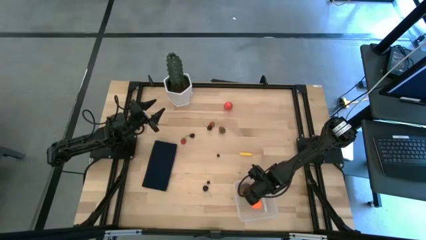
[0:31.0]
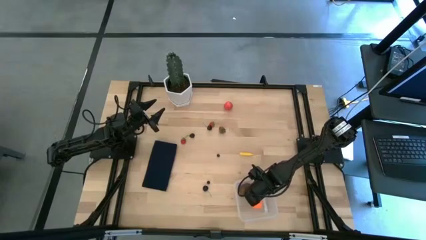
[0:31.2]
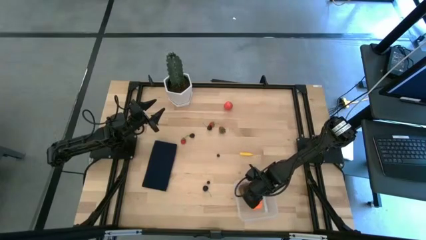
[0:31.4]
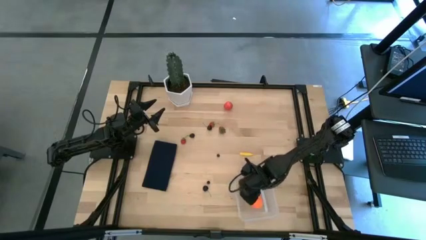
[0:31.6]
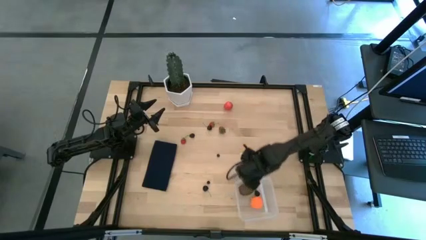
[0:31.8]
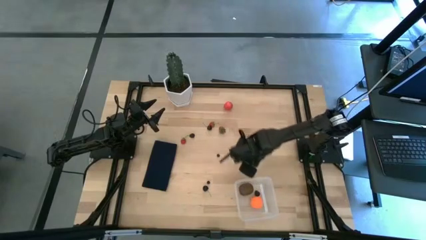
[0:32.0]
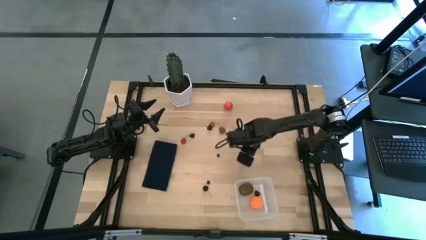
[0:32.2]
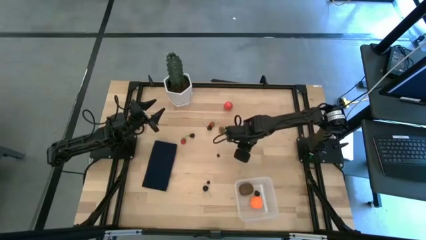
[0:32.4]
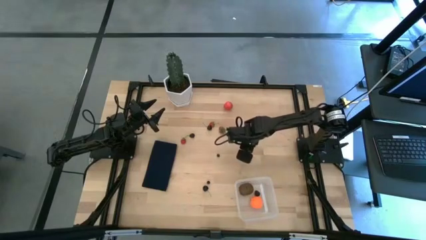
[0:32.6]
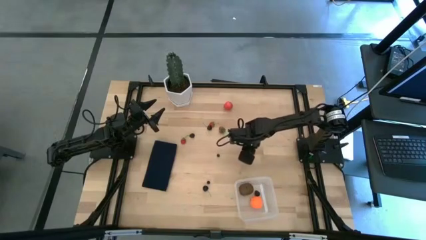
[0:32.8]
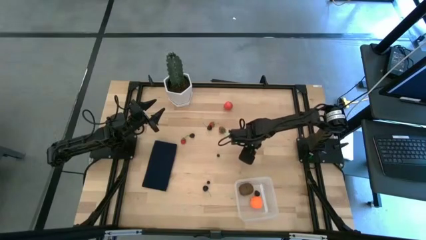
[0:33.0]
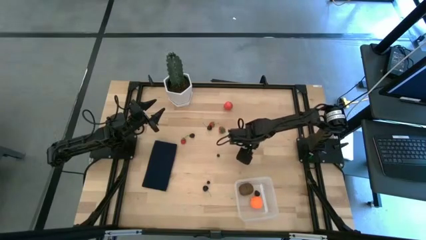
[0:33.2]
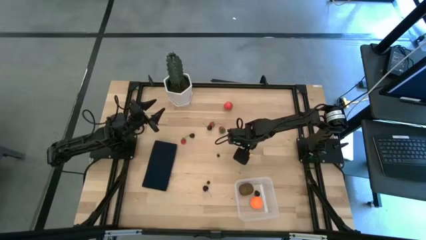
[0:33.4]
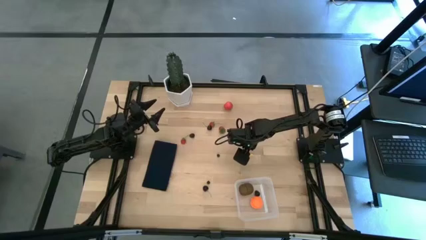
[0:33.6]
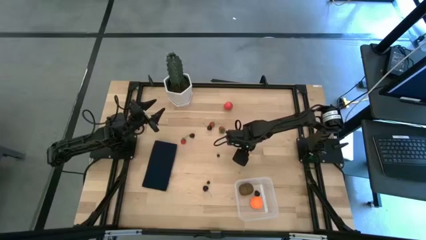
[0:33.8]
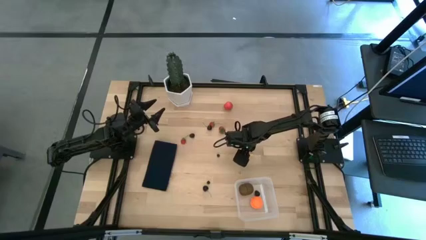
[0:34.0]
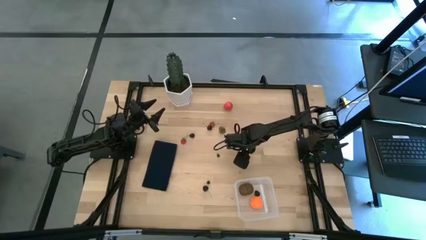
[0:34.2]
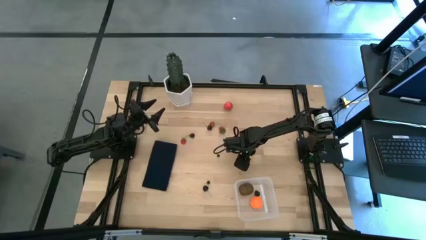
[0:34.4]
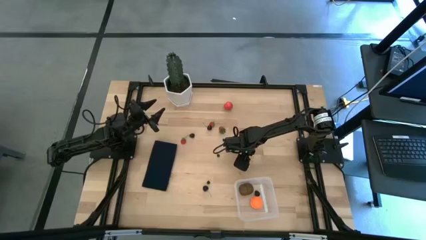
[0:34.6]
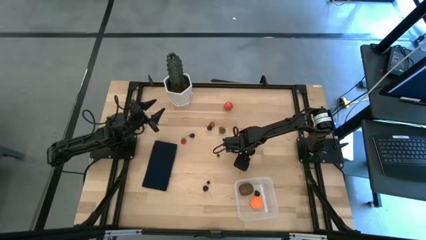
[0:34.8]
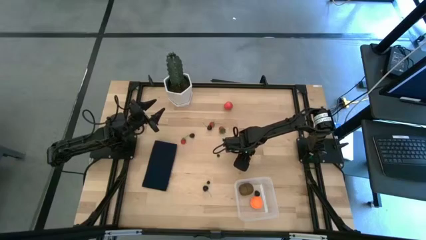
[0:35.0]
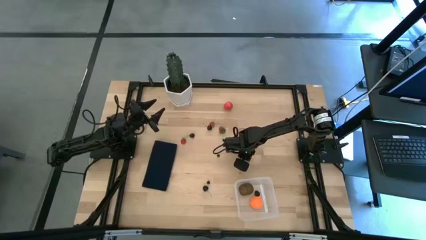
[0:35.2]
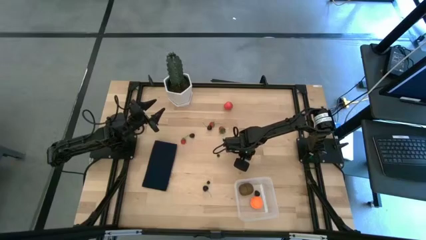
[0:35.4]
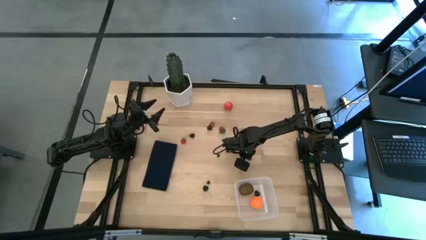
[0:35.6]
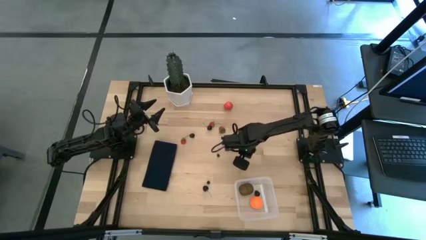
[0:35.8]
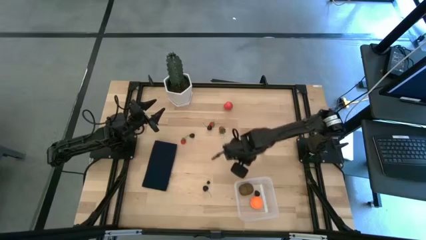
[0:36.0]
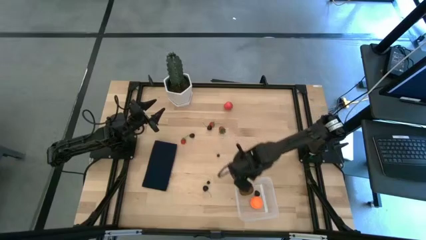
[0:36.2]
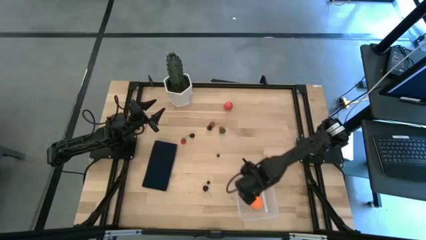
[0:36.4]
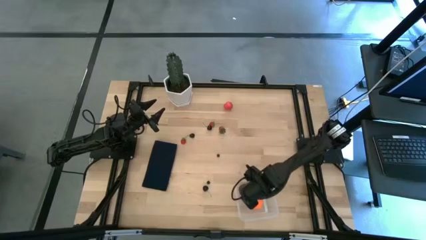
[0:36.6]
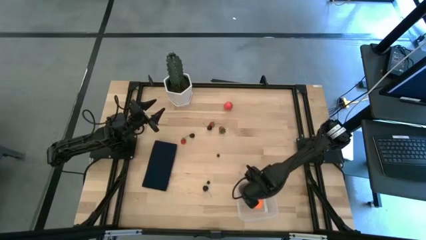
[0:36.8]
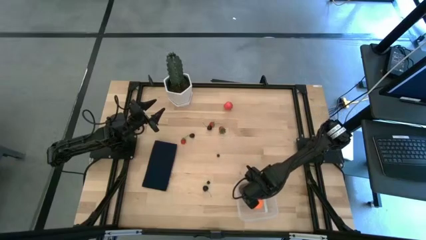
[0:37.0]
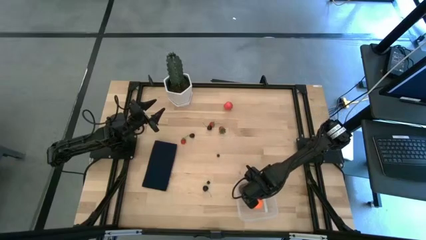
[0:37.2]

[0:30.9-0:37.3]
Task: Pick and placing Produce into tupperware
Put the corn into the transparent bin

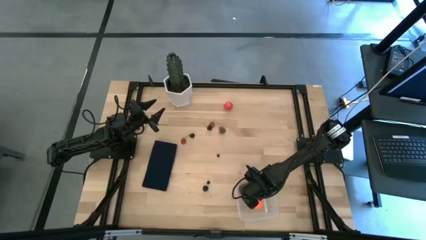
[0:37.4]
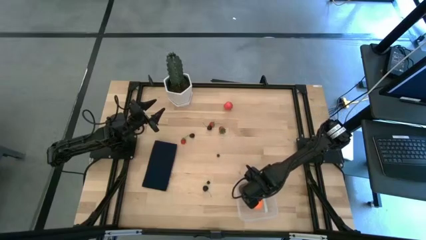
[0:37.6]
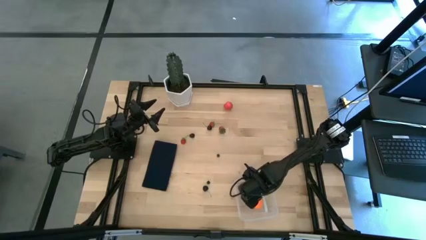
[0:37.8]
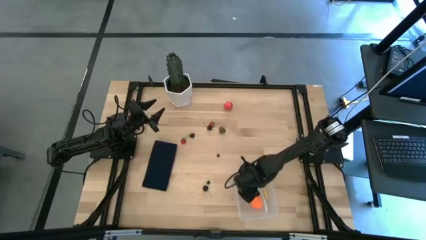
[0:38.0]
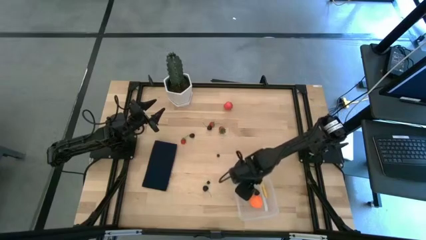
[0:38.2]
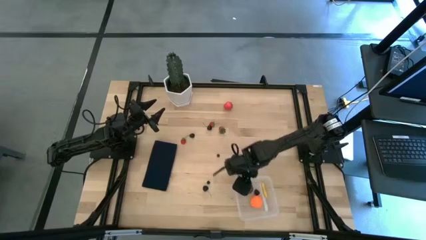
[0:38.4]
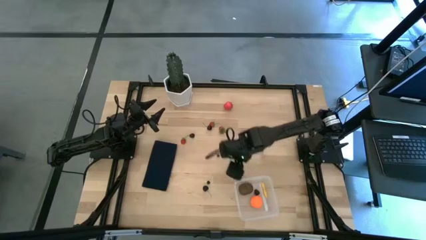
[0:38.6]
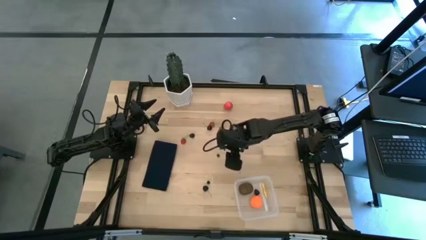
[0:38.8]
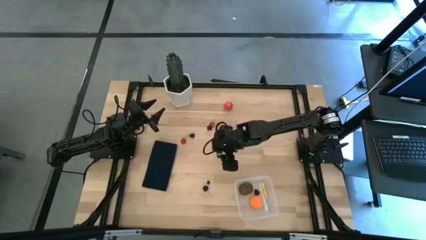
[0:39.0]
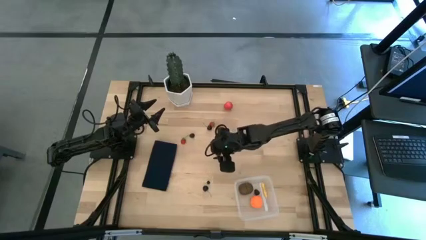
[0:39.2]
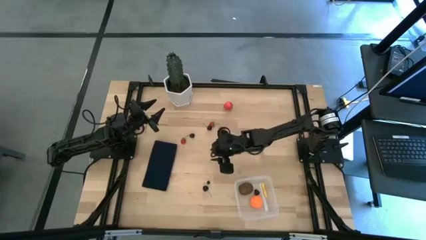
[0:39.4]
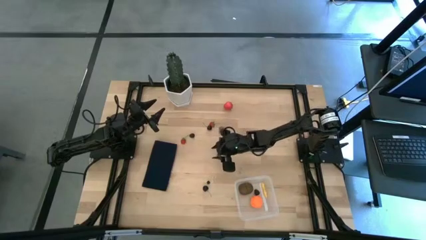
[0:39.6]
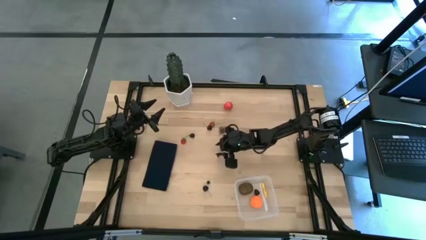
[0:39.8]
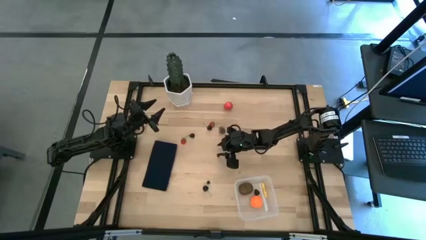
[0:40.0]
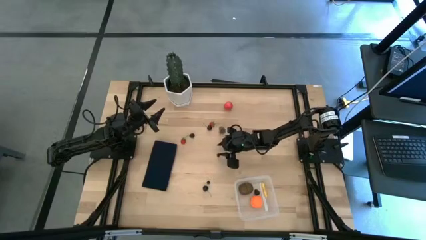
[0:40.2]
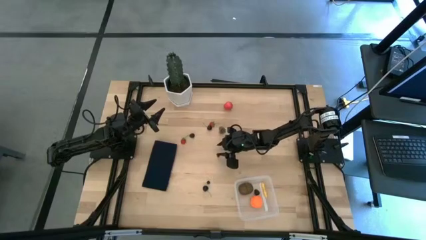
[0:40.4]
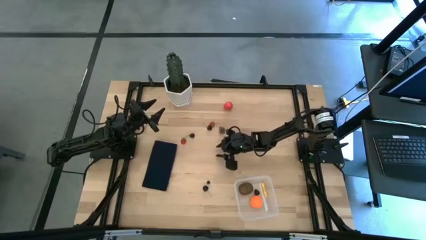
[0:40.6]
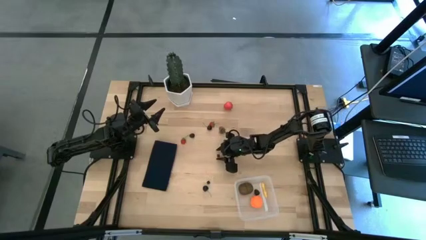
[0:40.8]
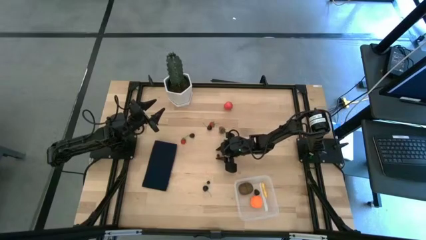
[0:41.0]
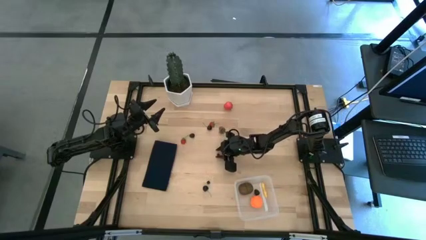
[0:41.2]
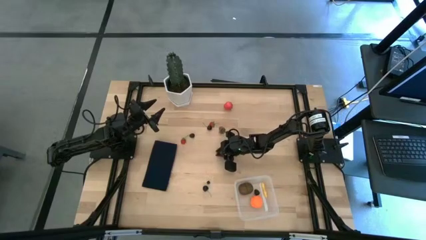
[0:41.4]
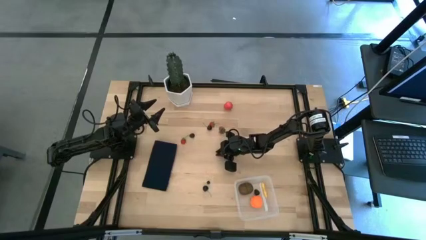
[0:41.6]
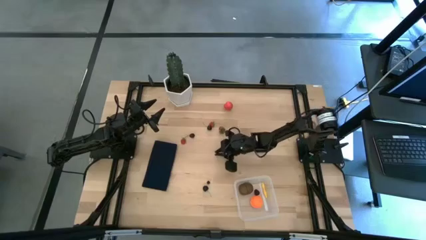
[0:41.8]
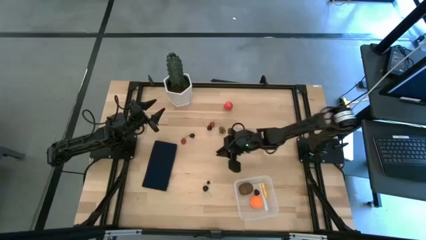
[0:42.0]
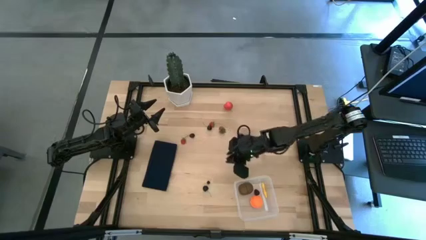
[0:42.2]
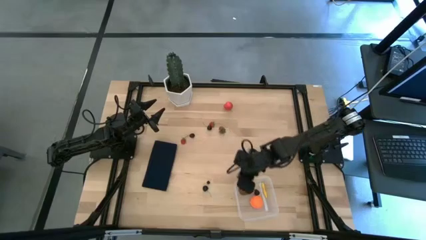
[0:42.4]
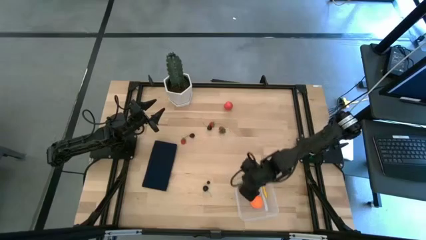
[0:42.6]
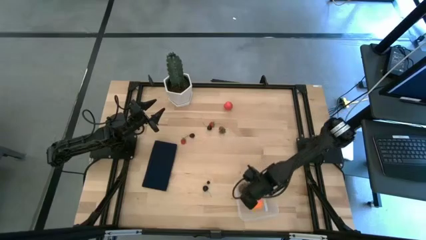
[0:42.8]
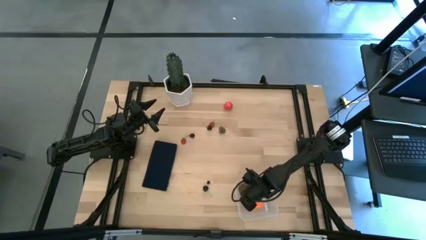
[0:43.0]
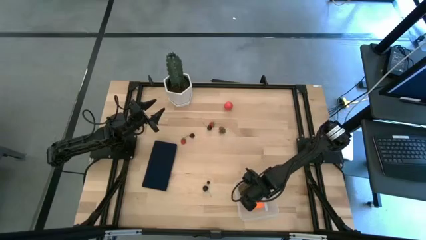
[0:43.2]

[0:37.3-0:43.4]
Put the top blueberry into the transparent bin
